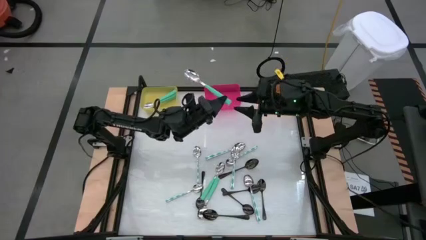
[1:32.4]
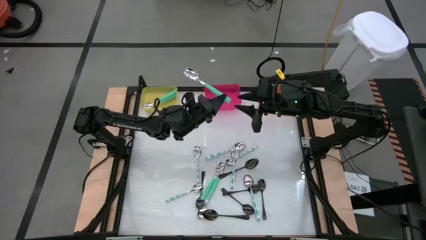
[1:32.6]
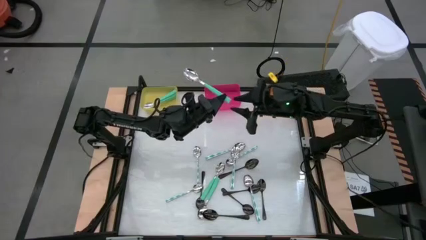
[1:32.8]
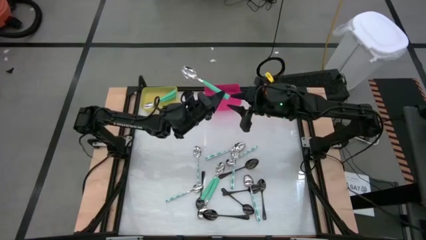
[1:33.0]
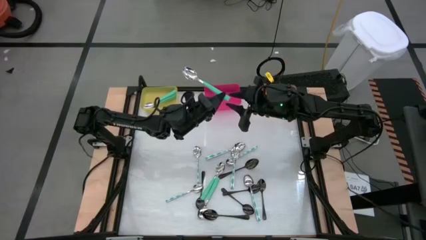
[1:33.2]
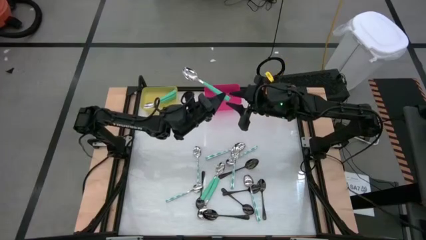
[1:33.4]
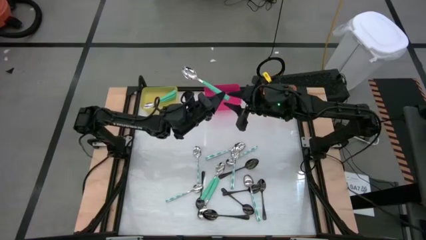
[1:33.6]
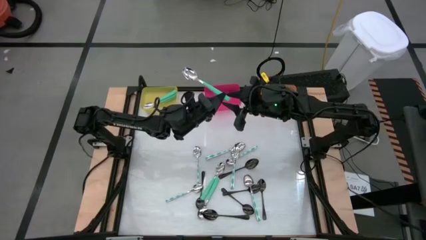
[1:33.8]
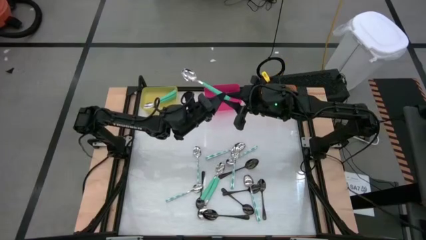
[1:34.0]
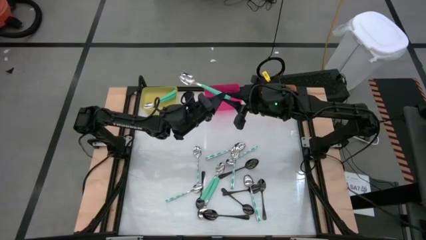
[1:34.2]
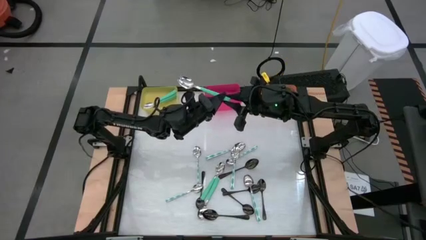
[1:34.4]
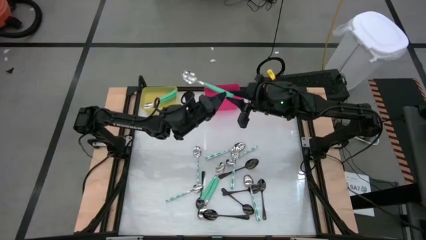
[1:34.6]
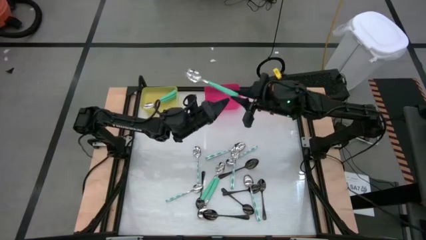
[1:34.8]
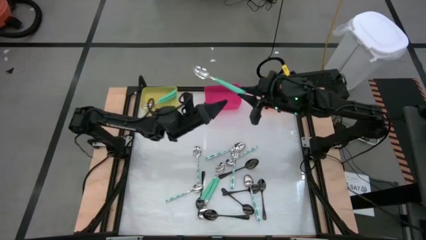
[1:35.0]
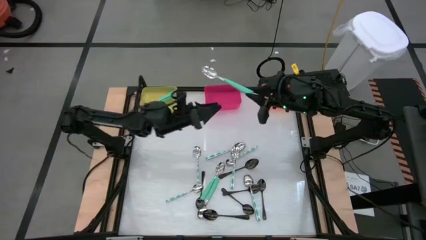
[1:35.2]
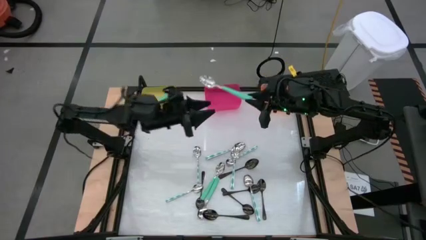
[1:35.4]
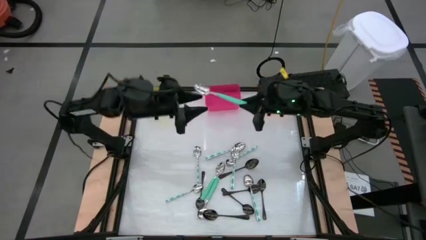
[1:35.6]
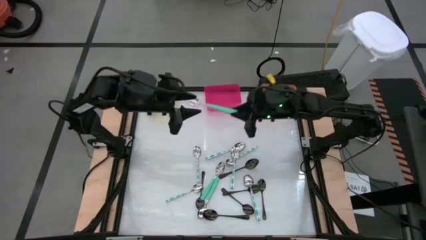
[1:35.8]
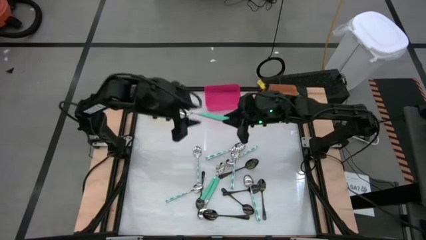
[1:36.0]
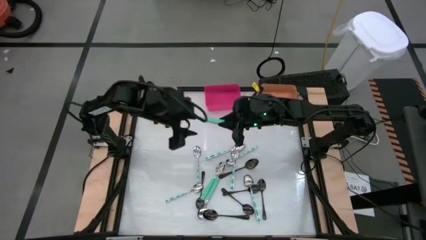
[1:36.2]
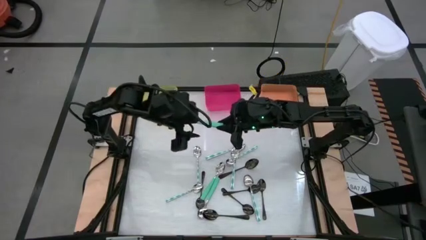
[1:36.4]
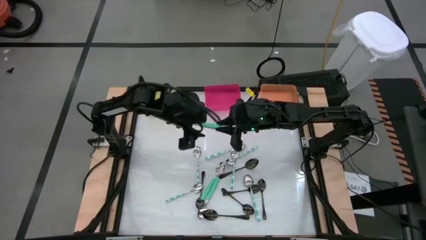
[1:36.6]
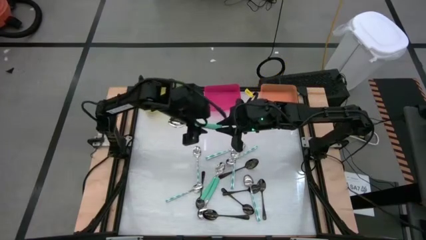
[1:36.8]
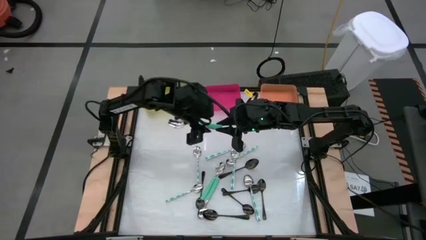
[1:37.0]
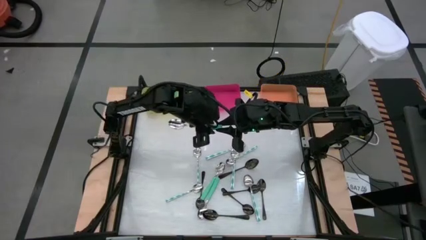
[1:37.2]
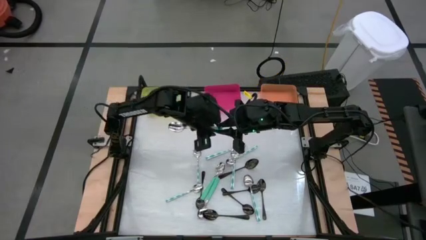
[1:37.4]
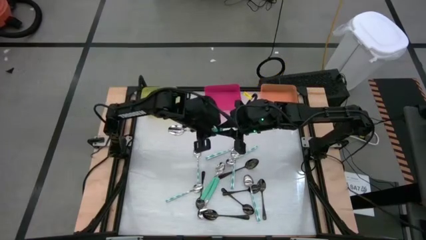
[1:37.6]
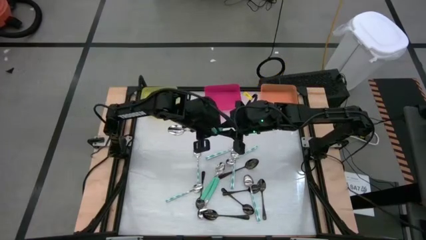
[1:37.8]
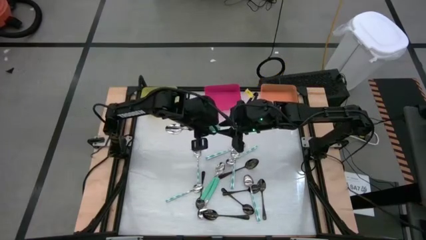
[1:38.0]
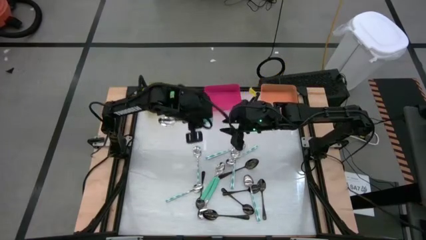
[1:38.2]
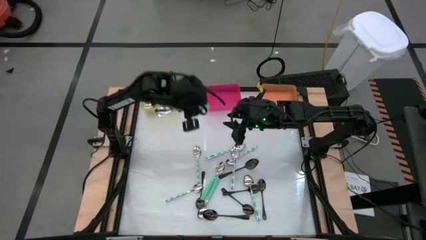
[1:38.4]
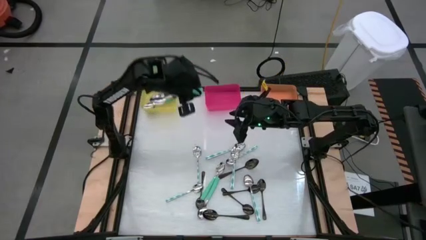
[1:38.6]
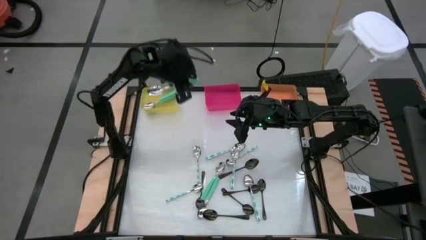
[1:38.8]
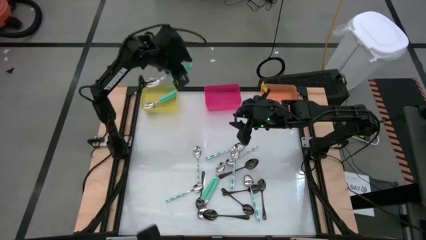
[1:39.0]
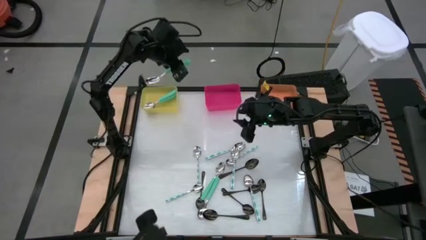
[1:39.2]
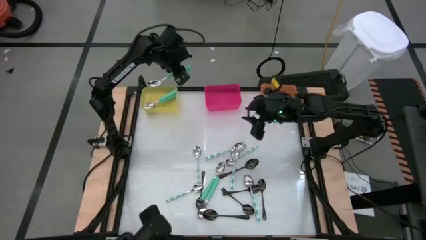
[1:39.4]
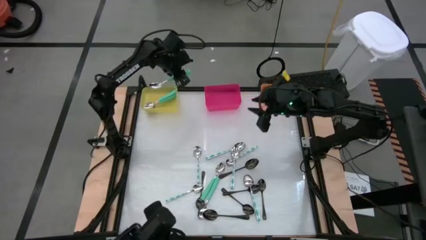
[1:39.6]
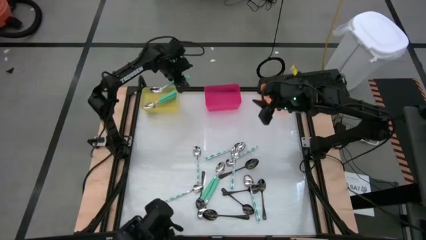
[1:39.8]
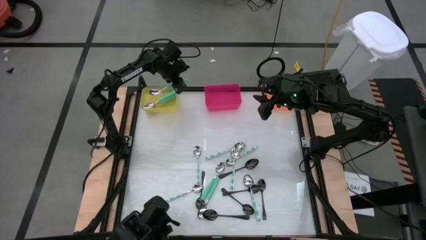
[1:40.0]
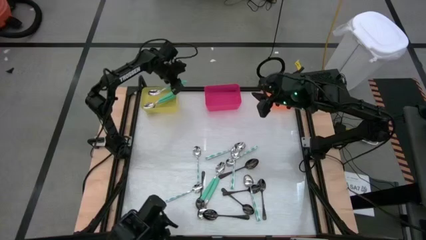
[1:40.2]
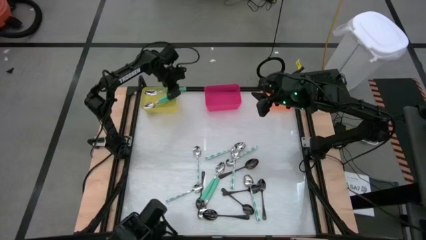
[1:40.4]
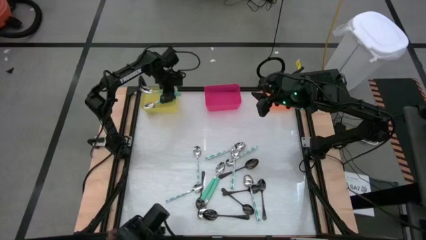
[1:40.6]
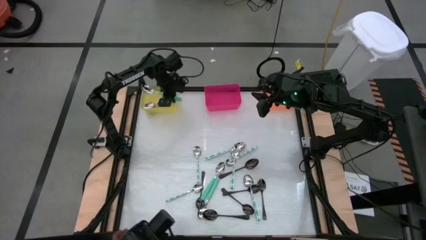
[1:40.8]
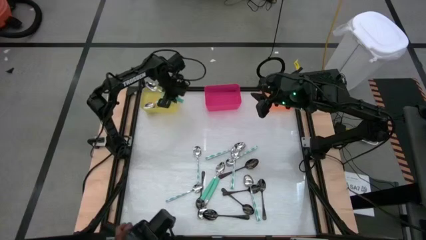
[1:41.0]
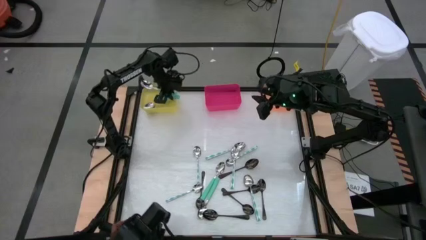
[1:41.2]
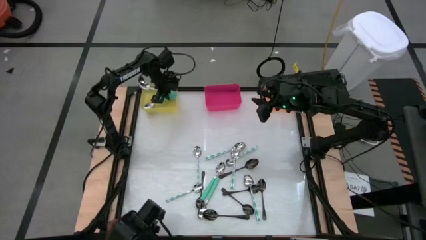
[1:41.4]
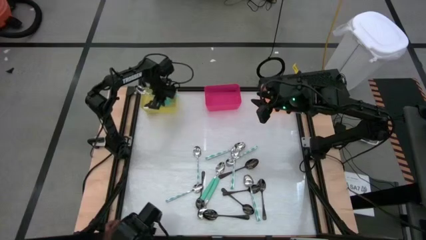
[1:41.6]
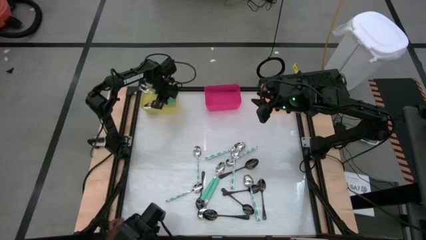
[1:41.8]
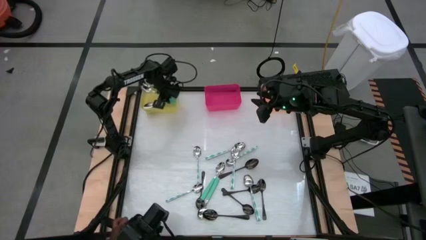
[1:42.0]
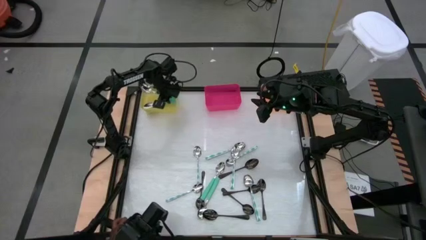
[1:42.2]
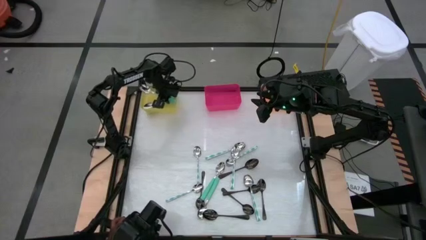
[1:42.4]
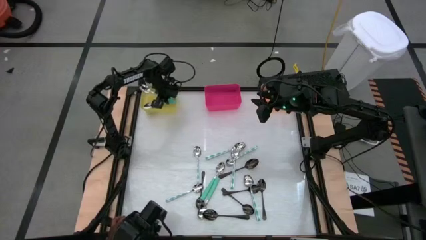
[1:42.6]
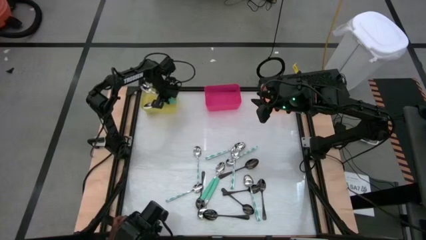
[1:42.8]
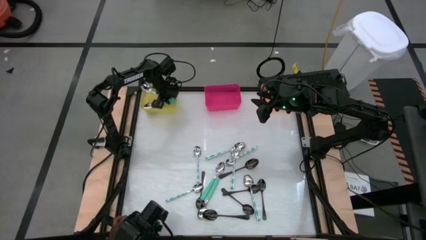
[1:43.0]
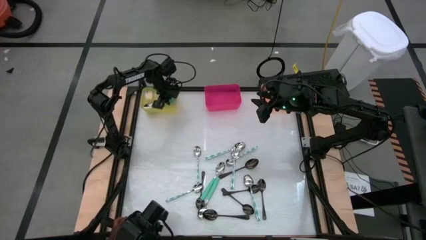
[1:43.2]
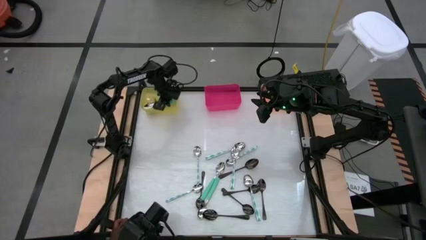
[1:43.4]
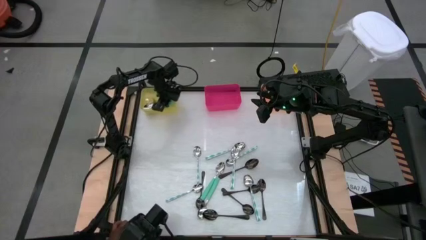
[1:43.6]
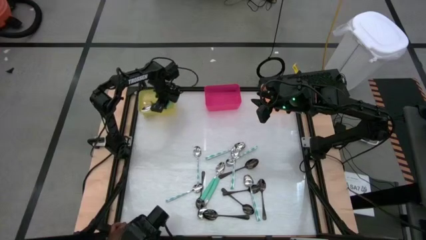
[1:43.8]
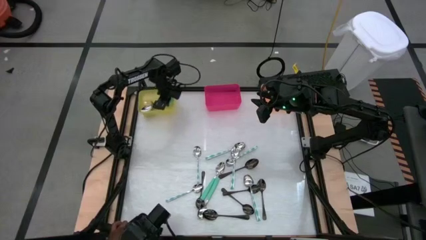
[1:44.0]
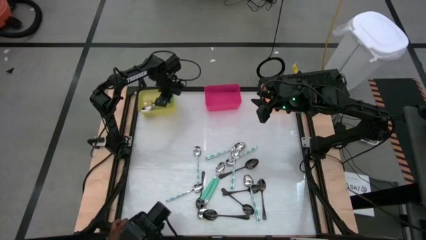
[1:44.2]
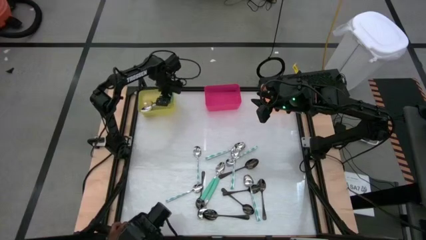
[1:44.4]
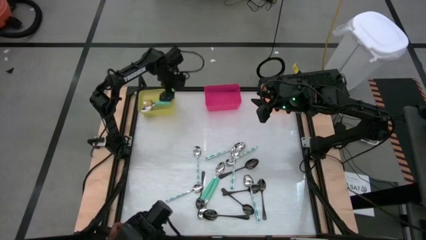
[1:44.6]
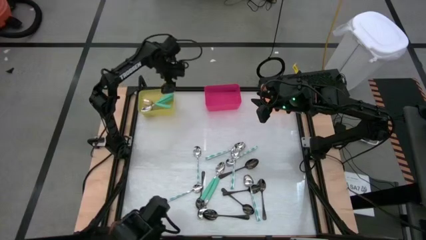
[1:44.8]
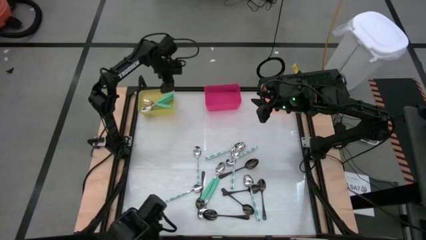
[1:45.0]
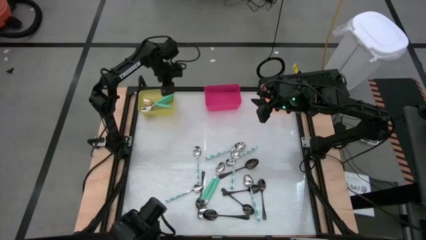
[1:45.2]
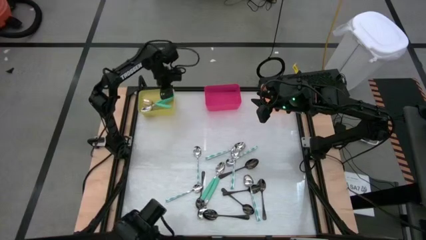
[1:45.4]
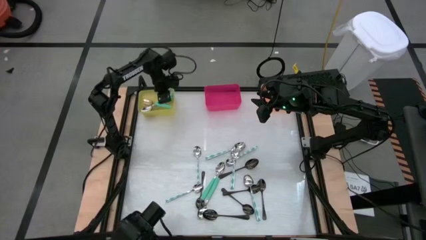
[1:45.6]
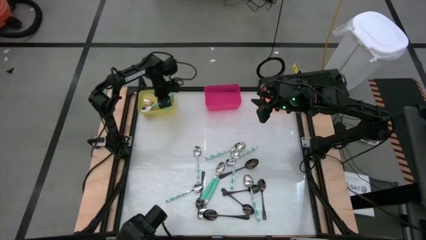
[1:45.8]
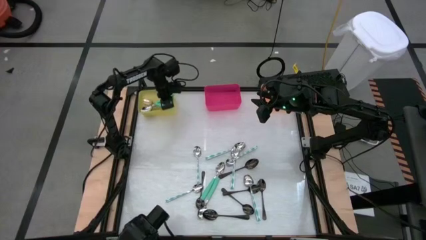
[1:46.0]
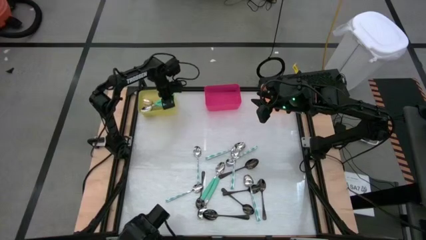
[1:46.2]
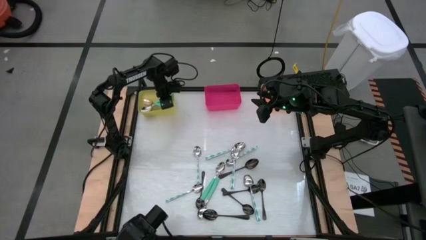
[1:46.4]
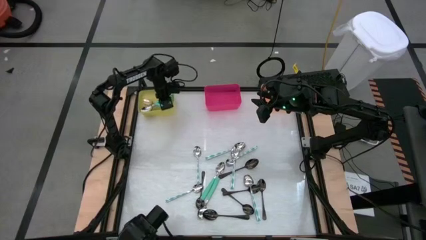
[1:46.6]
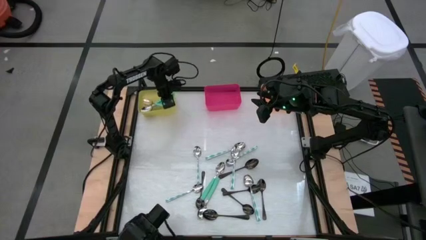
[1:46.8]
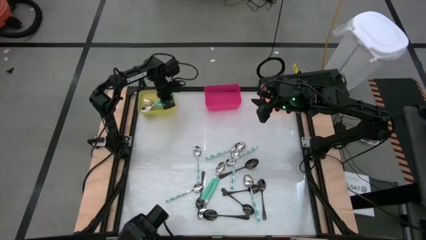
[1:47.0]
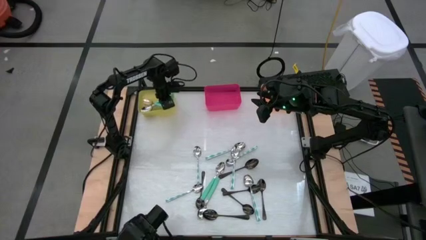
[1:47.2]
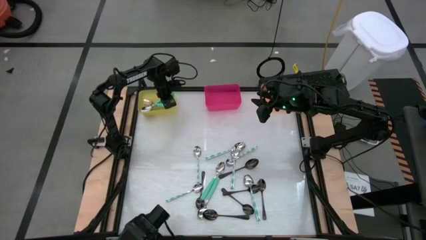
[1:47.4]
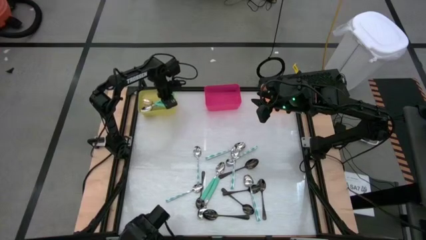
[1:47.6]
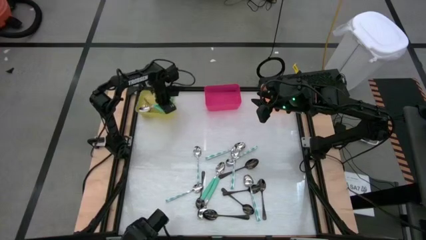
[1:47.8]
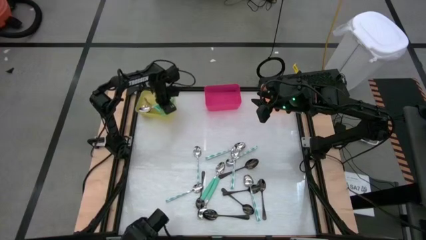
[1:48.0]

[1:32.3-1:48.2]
Task: Sort silverware by color (type)
Put the light green spoon into the yellow bin
